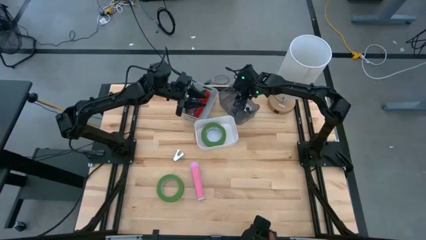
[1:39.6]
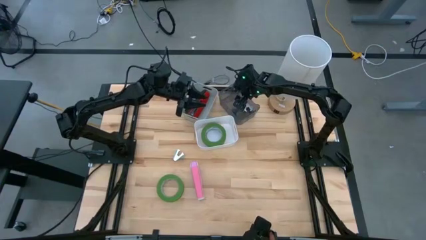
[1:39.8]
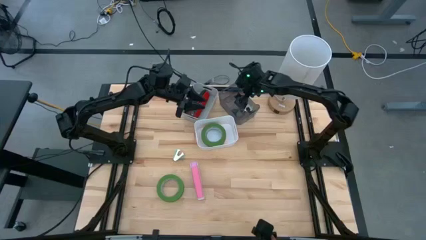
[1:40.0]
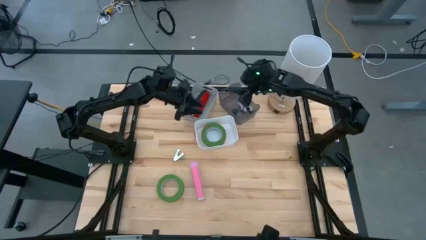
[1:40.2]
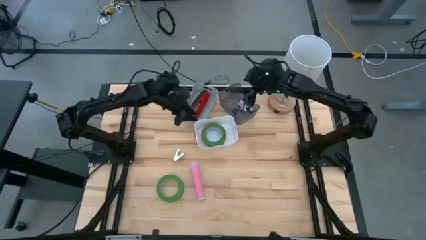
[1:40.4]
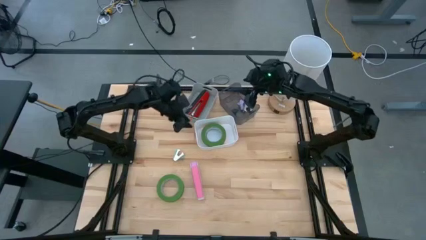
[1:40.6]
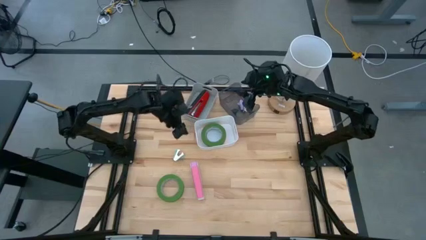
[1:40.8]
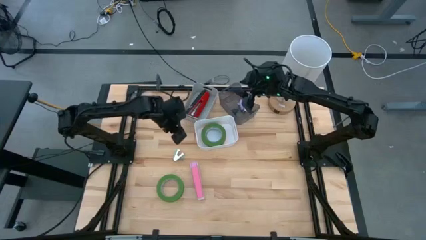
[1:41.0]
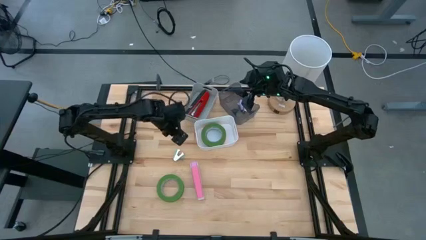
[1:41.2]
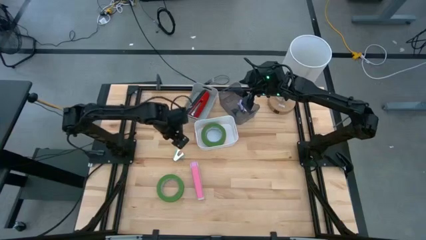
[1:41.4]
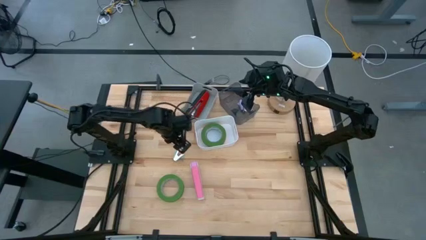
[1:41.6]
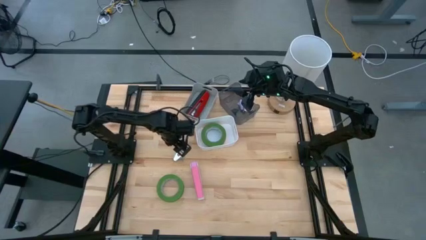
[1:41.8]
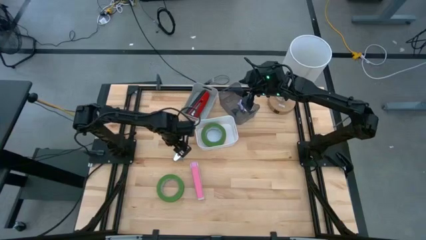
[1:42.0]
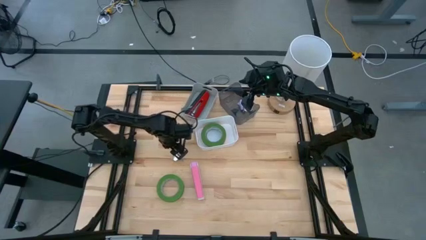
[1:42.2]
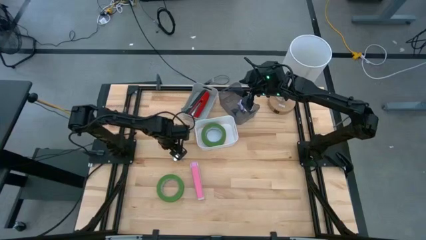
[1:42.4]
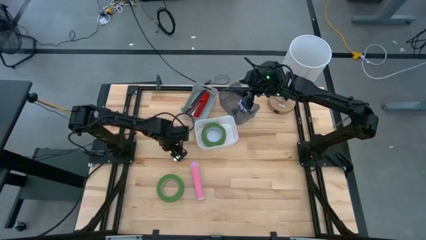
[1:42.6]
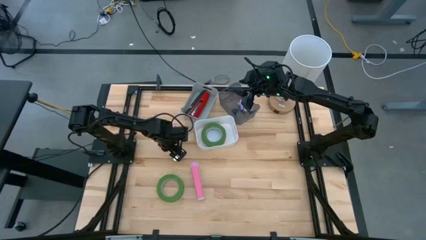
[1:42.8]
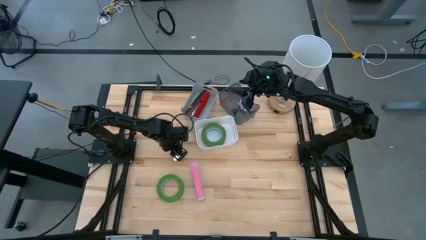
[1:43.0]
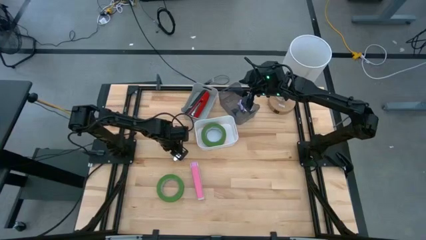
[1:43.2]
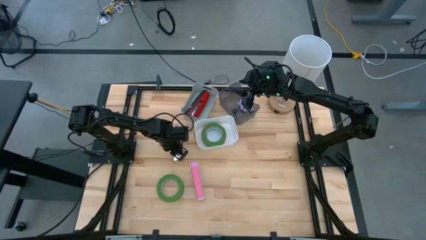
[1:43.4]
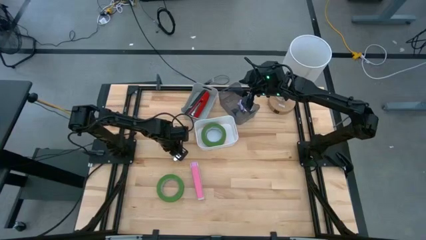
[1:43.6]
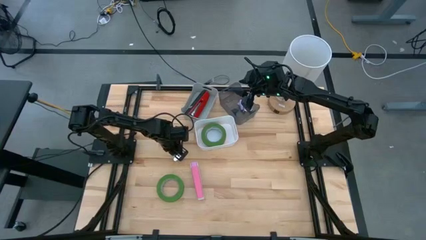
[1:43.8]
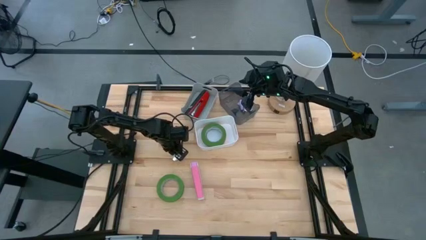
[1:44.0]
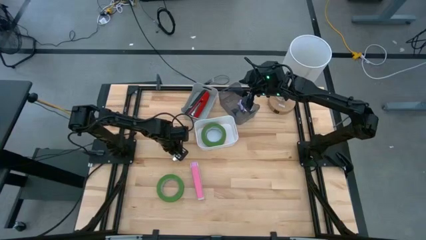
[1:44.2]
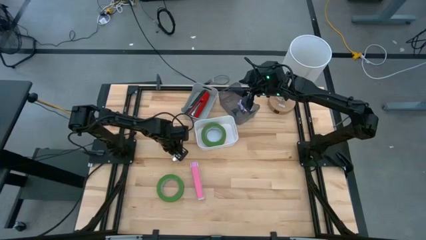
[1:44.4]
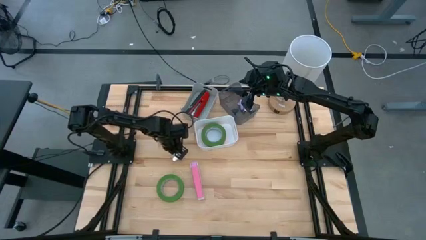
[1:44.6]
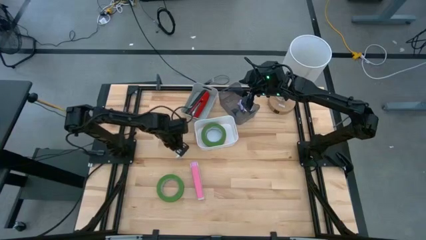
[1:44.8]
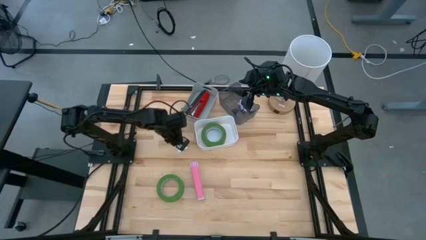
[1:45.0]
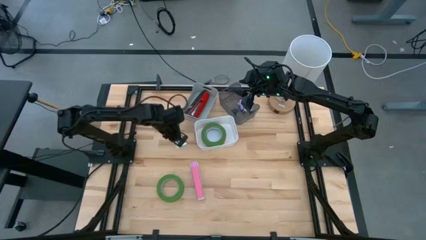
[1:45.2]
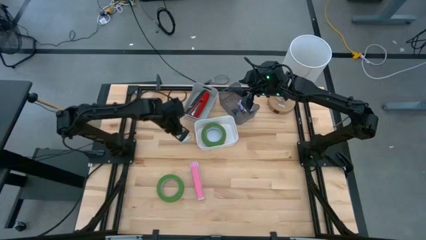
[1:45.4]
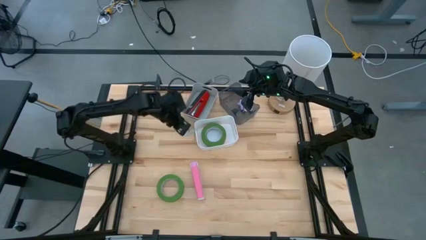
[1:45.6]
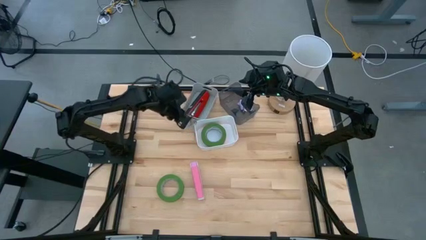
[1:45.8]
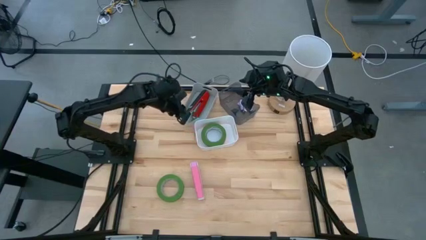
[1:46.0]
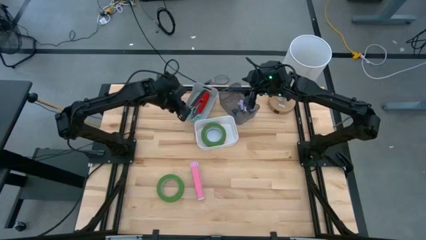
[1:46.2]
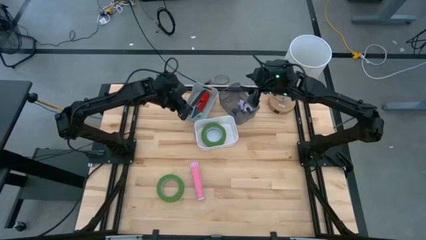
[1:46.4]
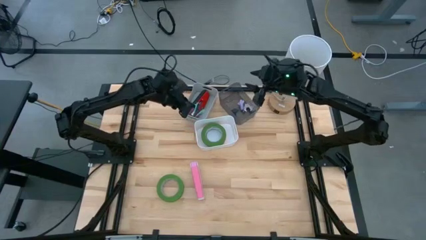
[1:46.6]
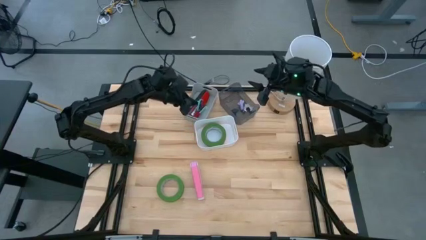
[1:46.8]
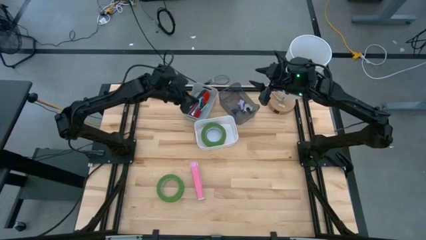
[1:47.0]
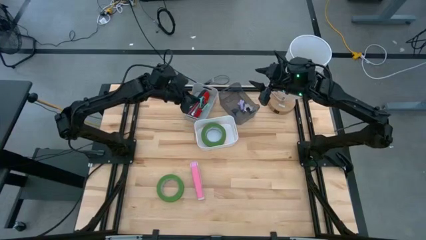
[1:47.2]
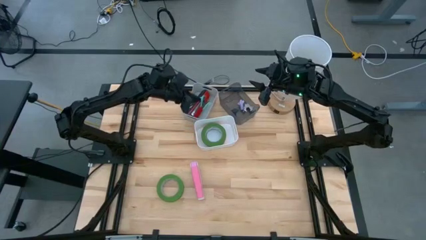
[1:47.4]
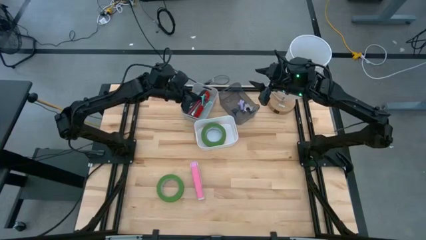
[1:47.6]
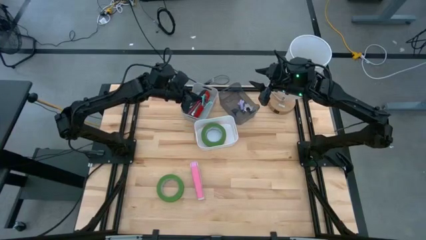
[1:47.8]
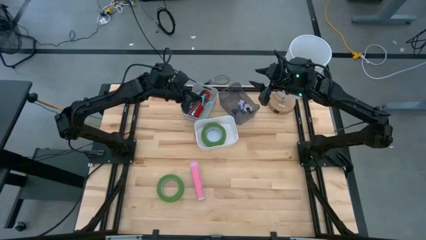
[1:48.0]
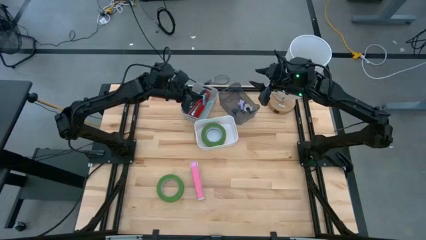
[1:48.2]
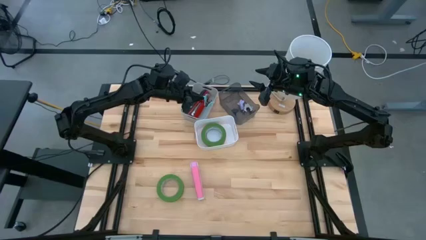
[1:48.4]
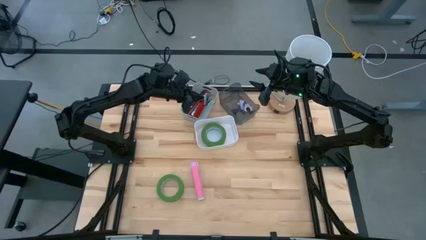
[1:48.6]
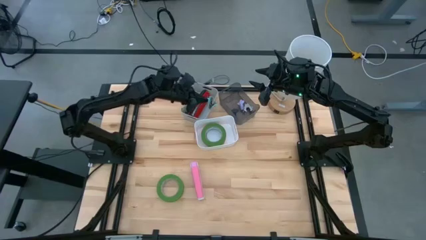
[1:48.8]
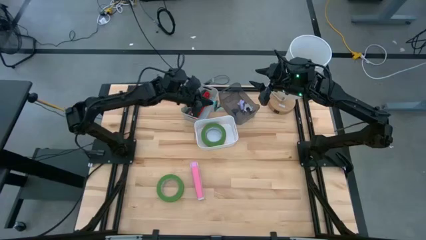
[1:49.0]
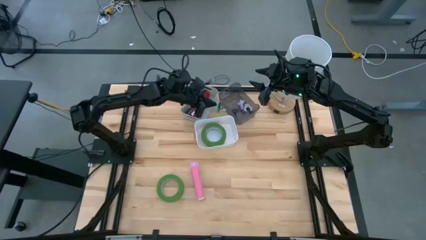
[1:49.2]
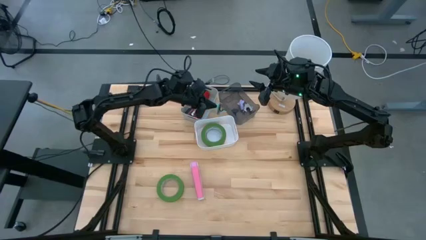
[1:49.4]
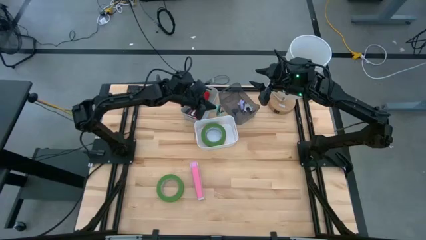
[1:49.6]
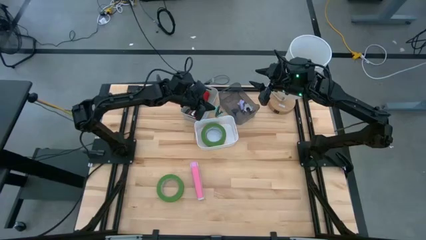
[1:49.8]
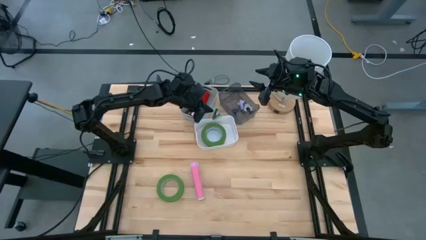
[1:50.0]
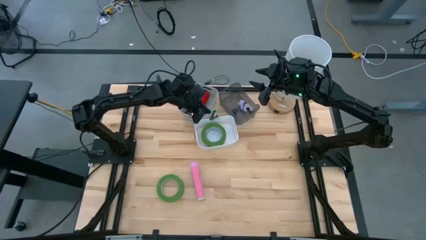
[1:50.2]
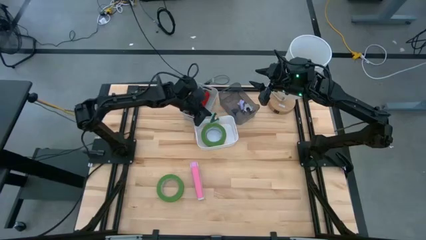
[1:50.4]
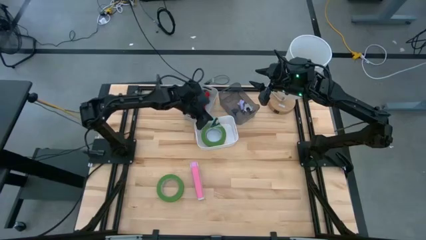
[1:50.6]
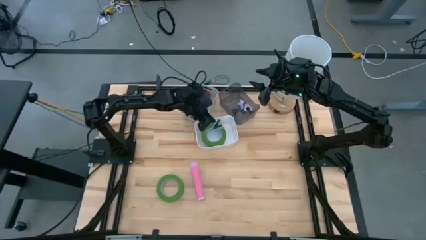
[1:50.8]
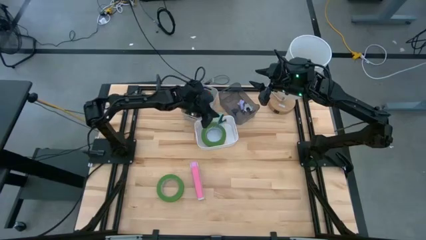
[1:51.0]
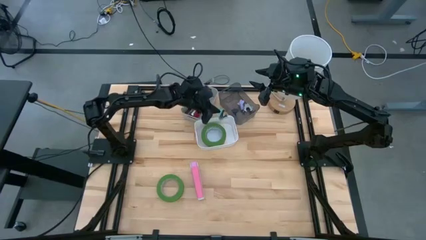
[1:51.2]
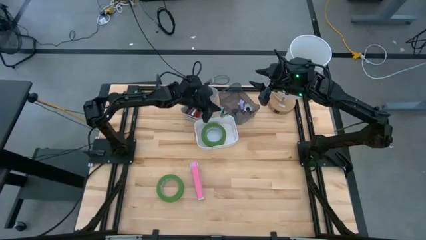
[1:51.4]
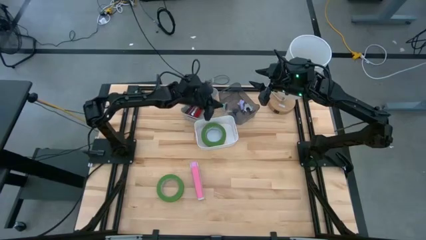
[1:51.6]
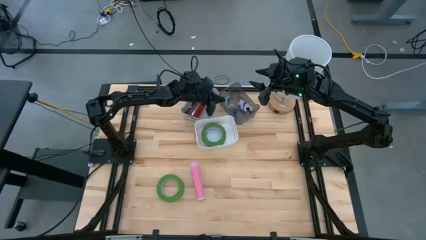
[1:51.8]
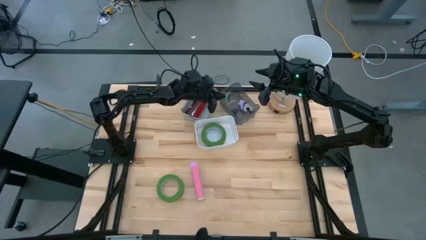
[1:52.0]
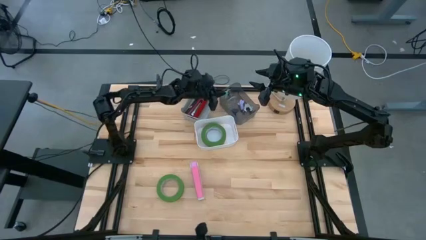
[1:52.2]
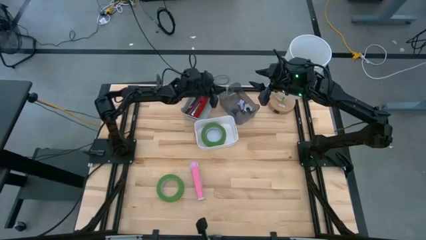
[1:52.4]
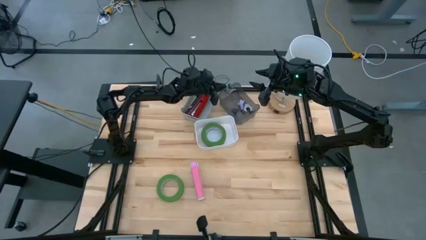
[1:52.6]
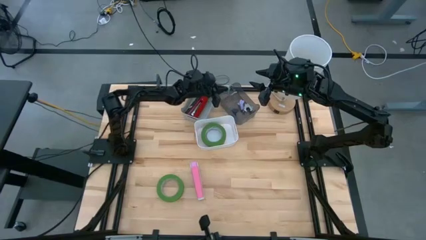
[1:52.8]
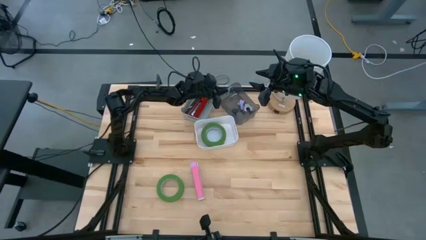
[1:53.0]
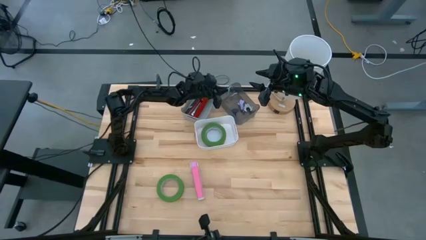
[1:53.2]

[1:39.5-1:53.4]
Task: Pick and place Stapler, Stapler remover, tape
Put the blue staple remover into the black bin
